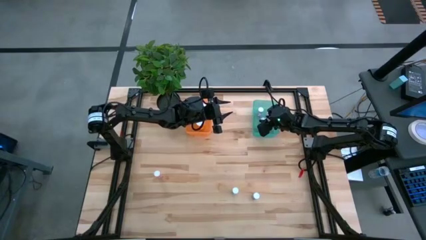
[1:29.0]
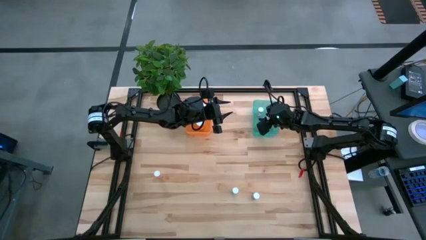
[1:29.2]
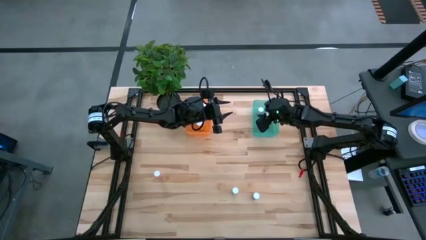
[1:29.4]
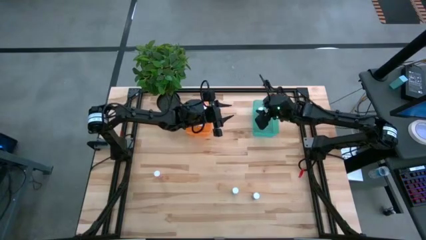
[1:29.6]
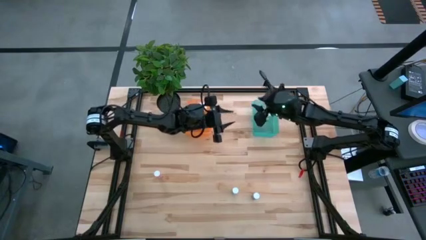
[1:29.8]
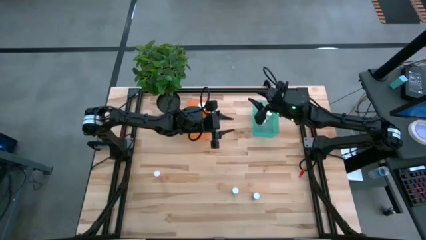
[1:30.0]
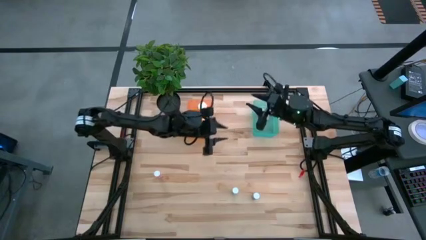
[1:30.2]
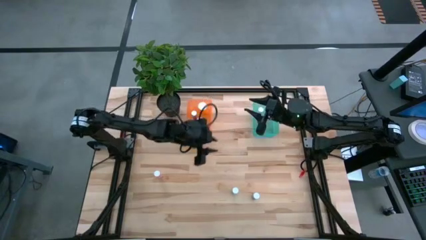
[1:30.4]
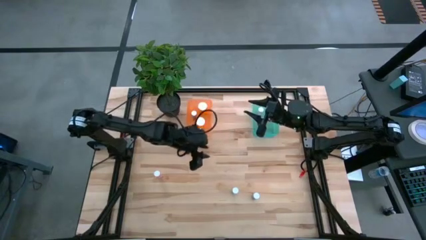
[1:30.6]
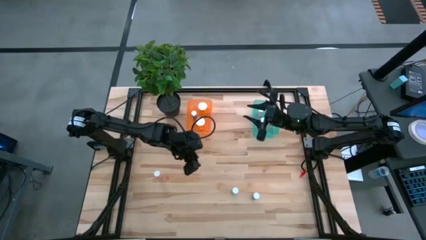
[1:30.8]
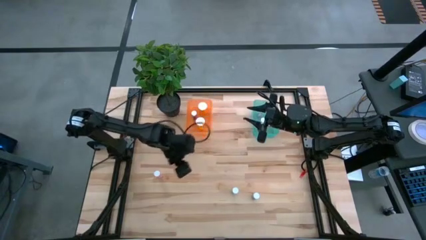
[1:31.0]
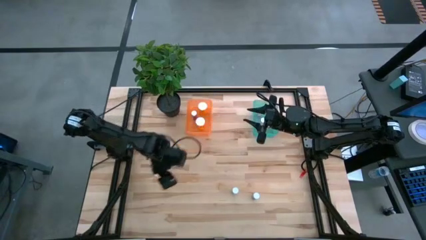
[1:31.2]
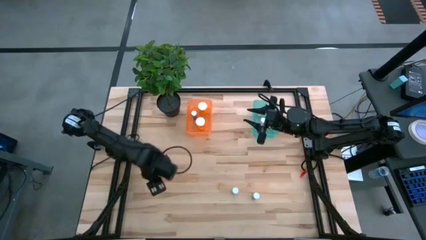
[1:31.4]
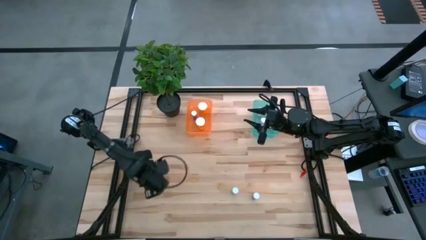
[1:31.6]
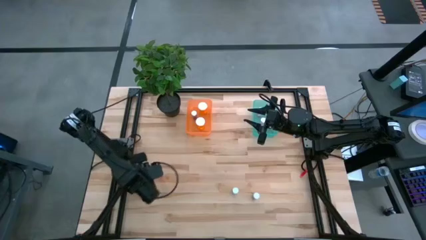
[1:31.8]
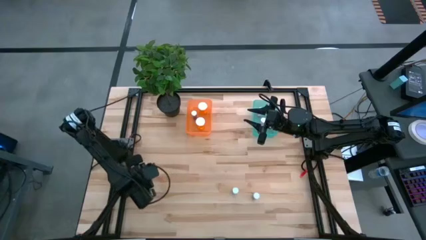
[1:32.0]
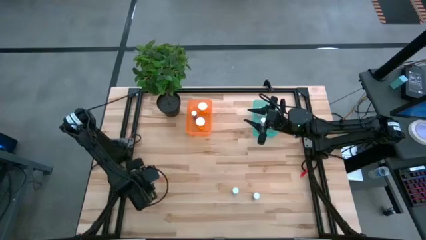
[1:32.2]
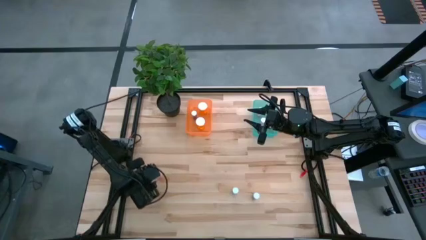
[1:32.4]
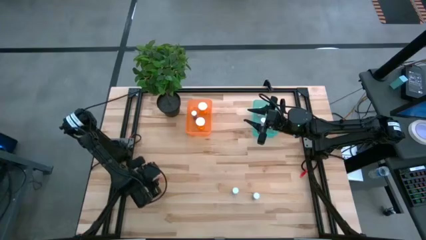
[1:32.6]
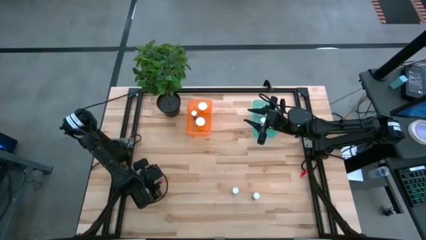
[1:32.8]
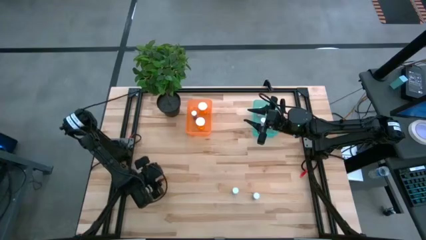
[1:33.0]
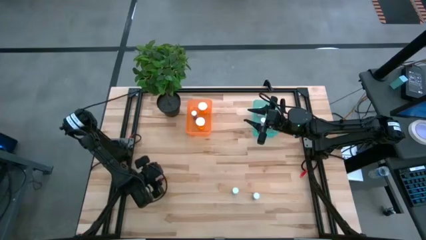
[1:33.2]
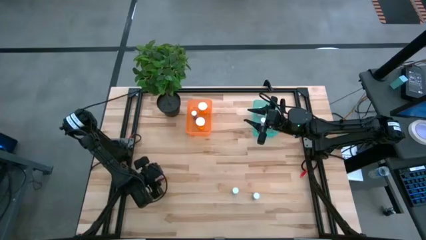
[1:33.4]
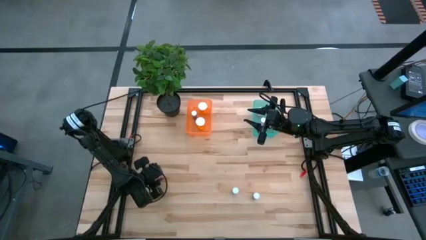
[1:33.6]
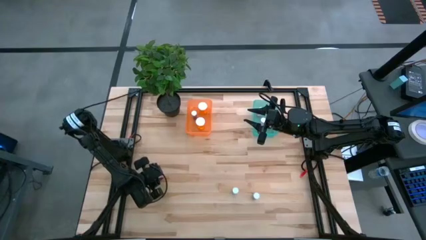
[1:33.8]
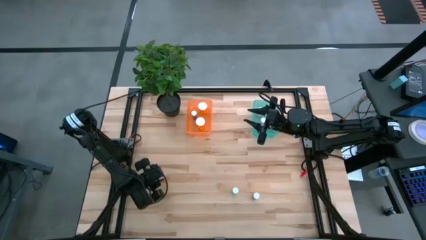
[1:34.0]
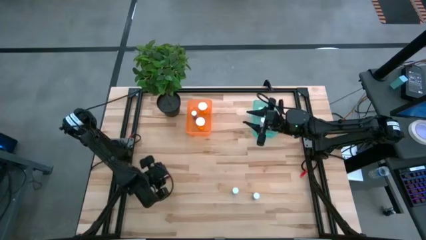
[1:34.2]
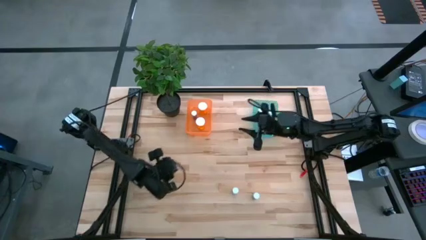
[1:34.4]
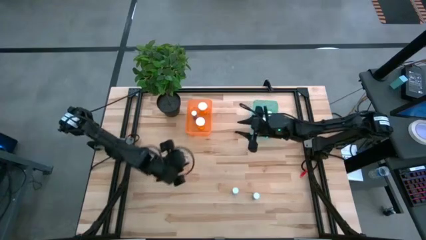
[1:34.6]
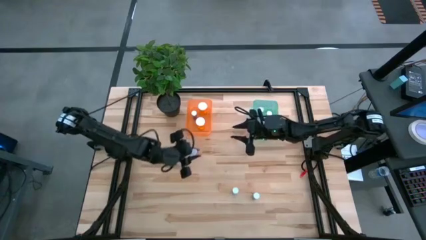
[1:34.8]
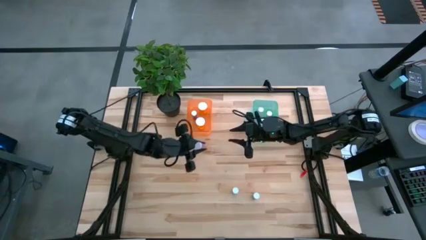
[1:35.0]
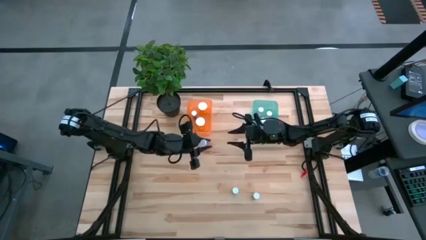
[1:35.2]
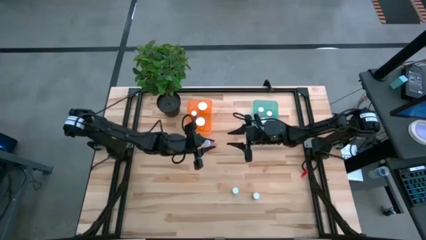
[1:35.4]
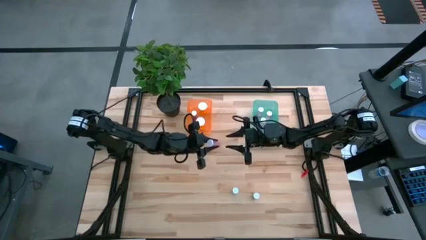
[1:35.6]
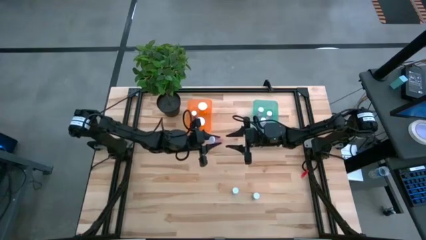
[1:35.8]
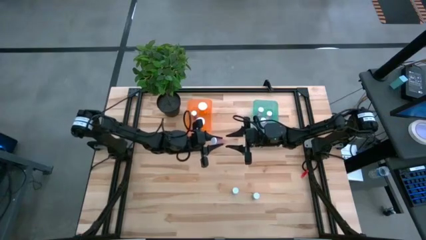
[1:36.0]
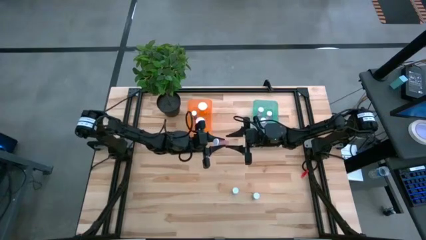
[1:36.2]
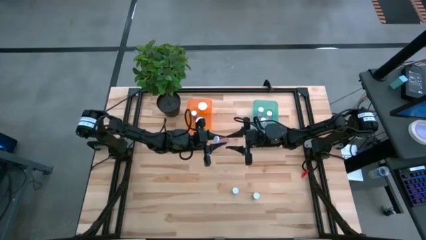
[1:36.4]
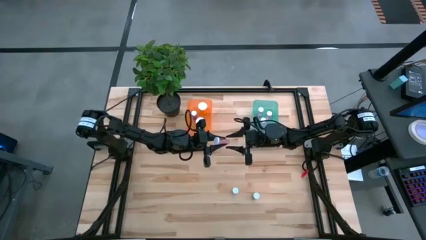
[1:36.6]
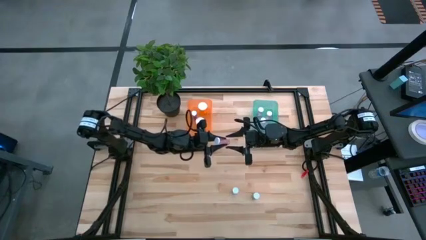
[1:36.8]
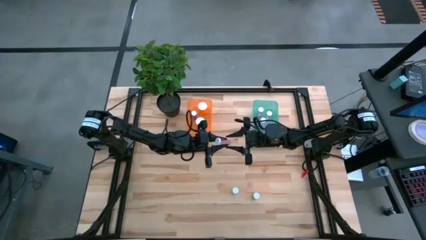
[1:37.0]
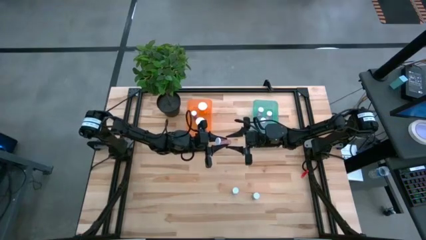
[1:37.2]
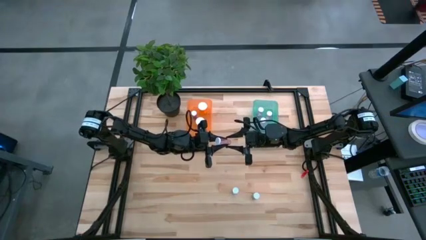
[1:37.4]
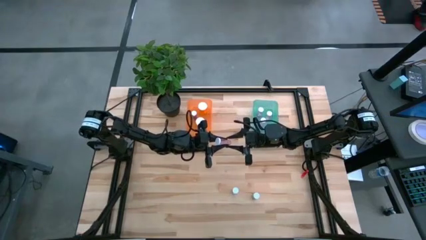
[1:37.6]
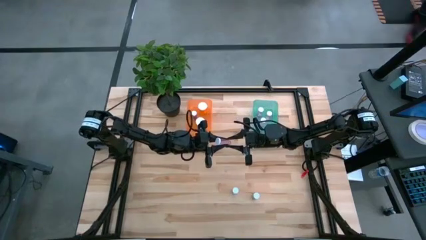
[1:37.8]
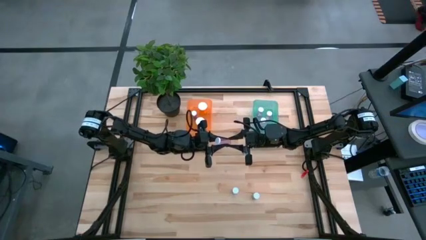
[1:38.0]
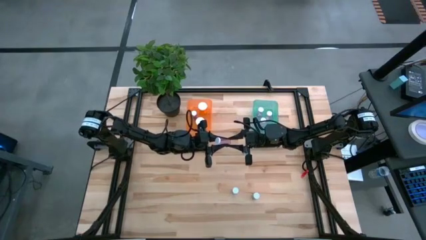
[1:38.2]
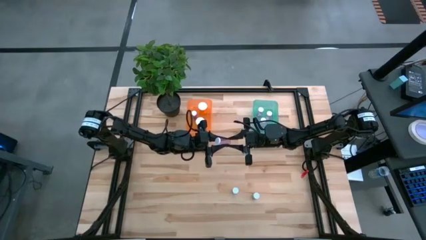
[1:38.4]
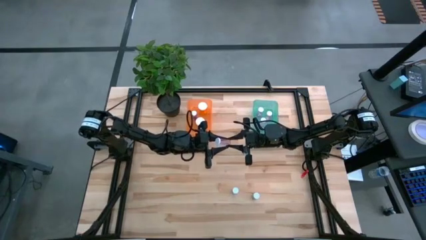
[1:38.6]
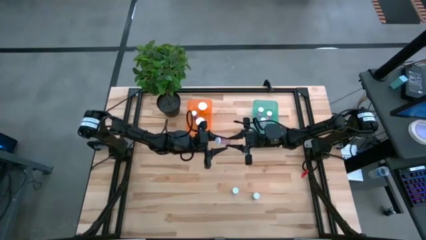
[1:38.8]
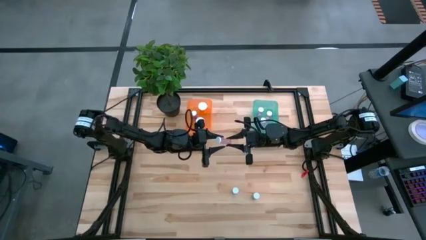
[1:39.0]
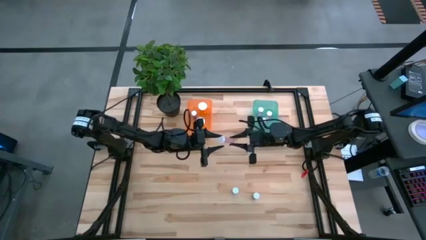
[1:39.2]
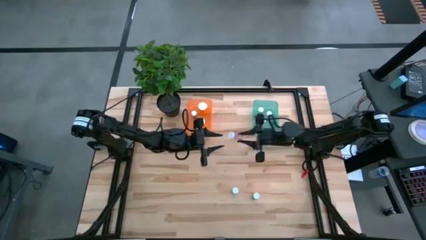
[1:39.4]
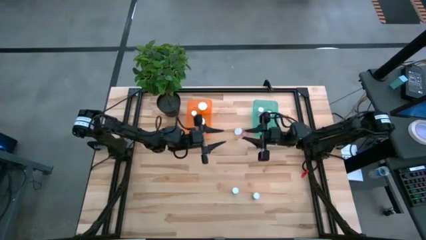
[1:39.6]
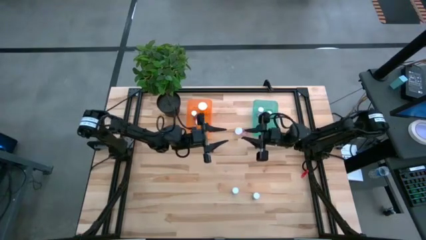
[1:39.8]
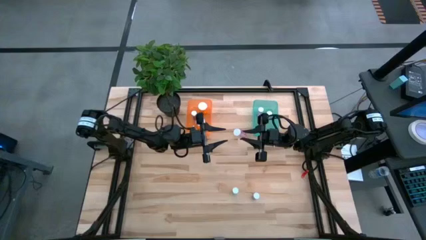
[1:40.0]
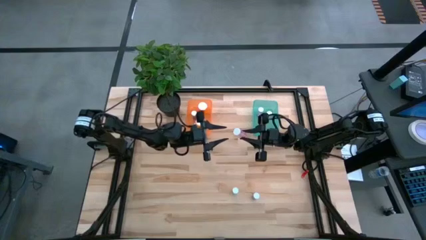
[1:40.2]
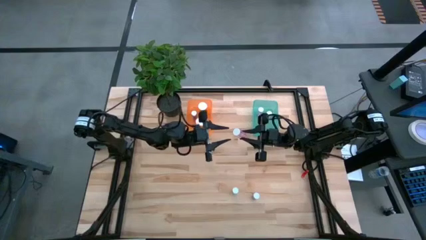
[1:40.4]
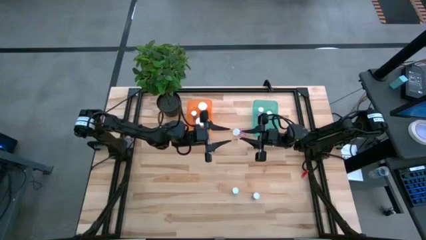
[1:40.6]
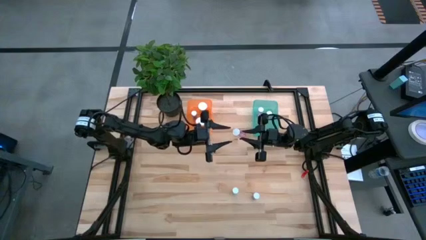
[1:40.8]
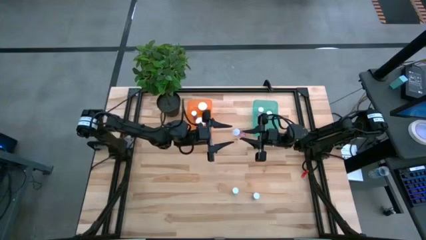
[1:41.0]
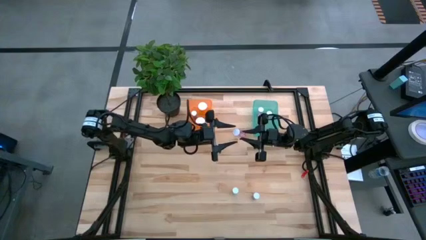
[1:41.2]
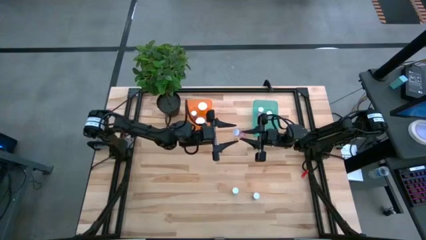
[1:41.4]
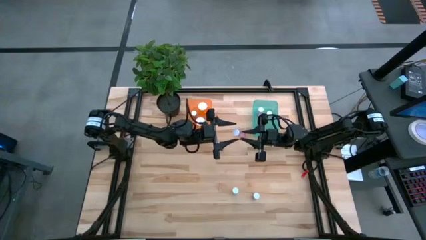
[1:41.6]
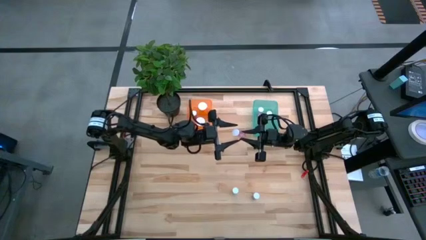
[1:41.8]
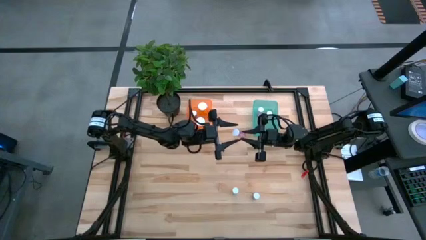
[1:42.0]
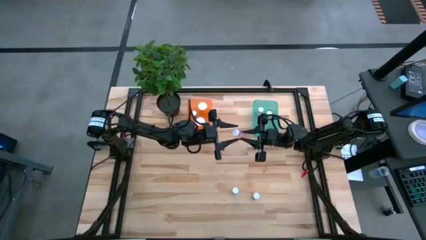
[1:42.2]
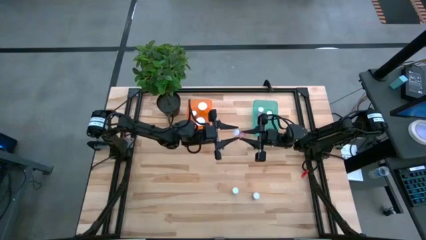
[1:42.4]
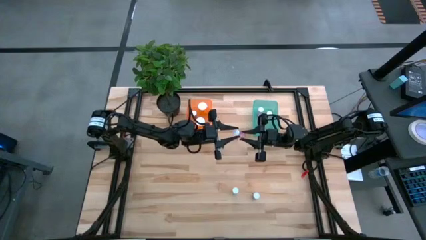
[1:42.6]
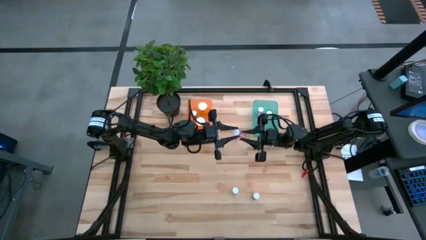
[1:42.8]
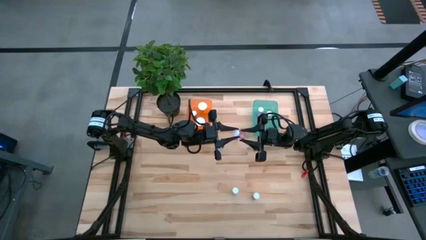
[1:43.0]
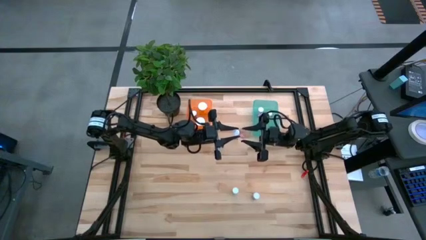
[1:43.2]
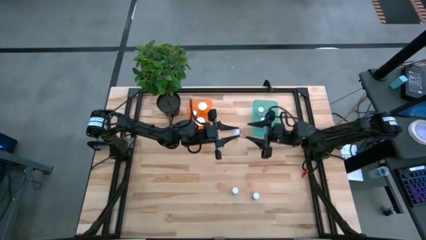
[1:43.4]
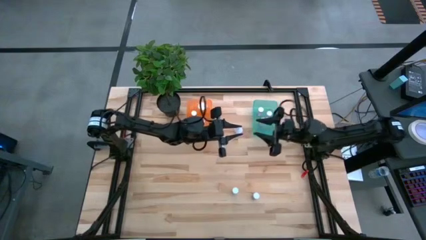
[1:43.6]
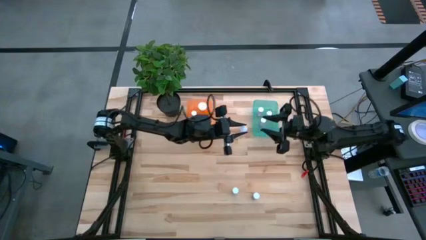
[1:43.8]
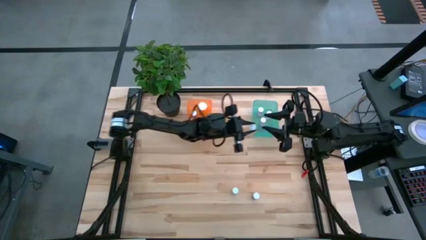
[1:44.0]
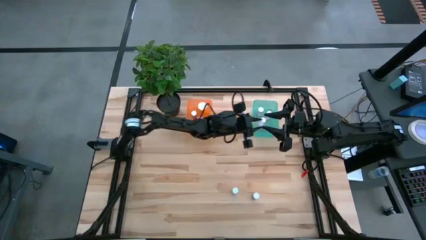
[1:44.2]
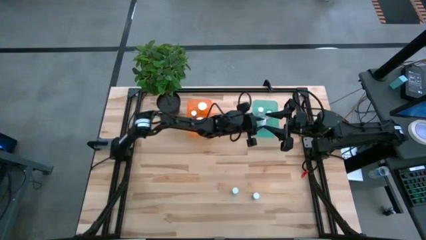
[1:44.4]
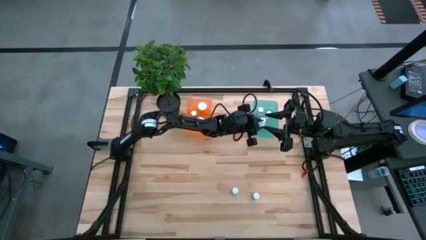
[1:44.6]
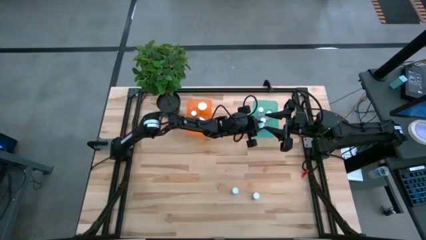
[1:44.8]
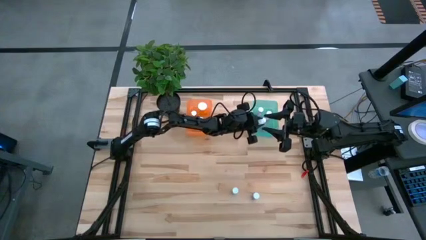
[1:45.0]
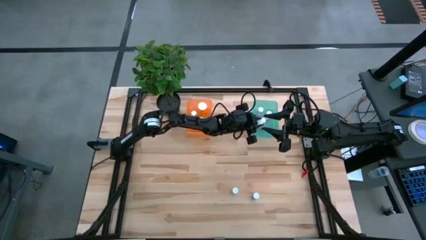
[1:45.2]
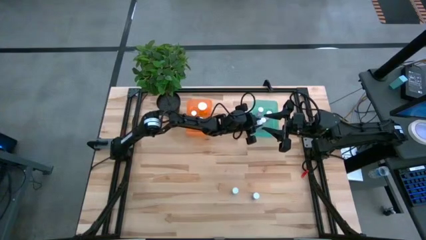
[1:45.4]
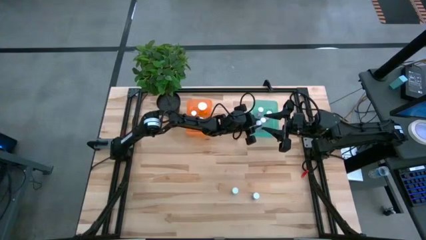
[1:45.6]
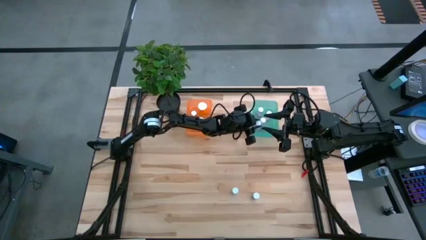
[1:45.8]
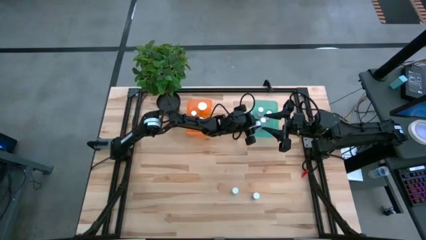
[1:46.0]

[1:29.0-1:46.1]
Task: Pick and place medicine bottles into bin by pill shape (circle, oval)
Put the pink tablet bottle into the green bin
